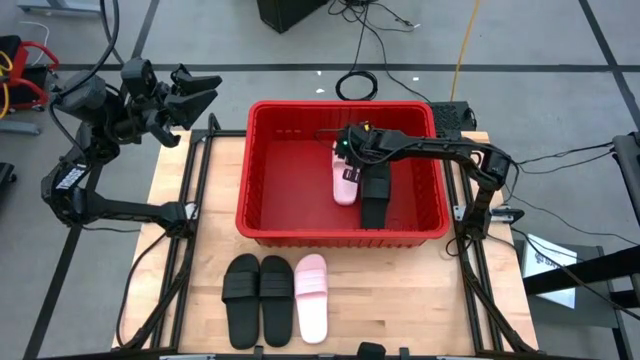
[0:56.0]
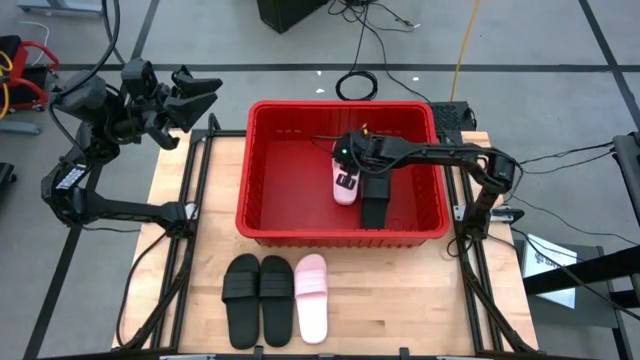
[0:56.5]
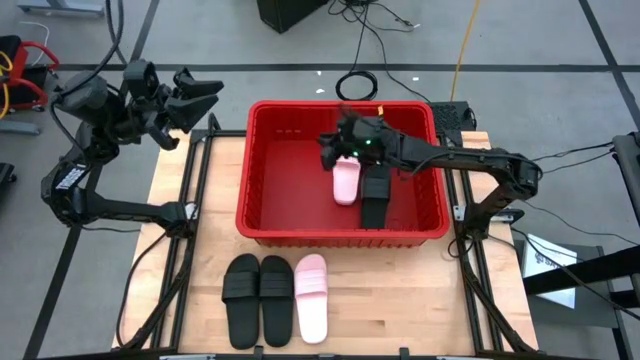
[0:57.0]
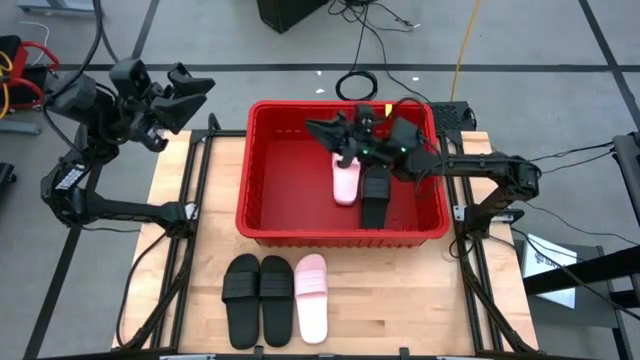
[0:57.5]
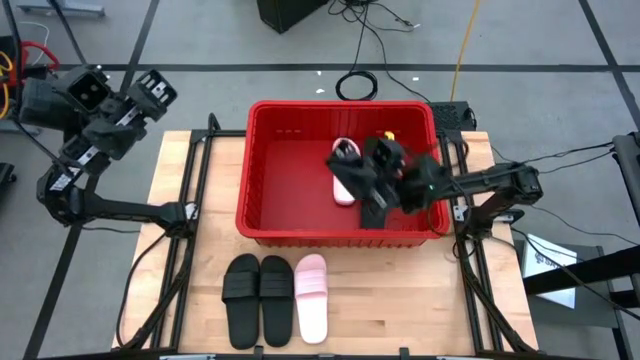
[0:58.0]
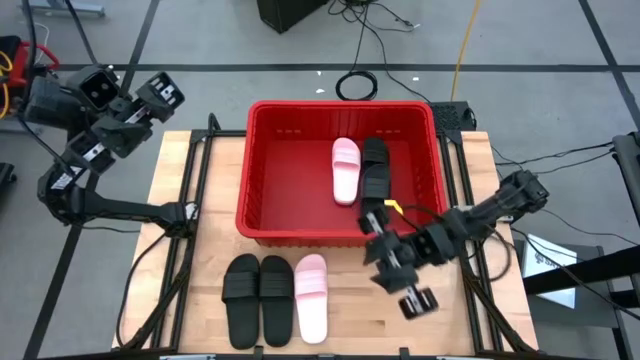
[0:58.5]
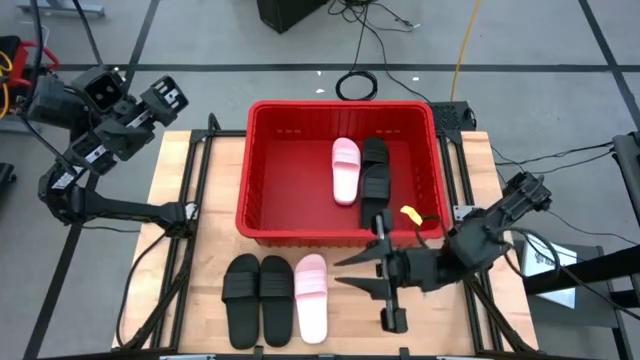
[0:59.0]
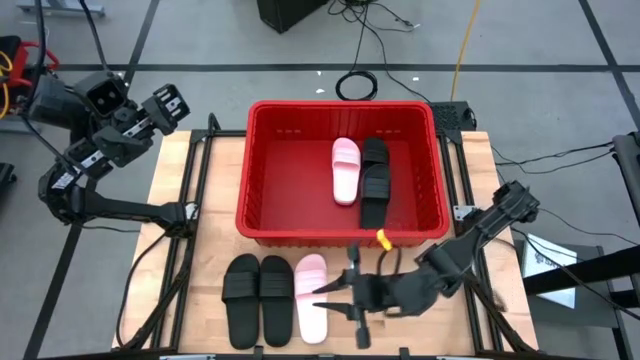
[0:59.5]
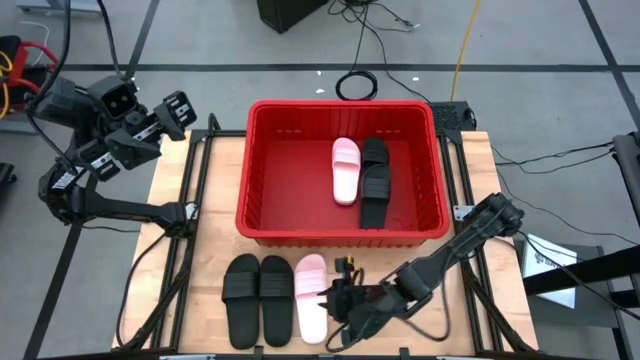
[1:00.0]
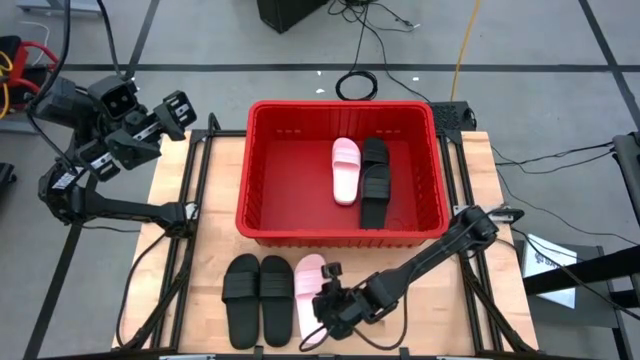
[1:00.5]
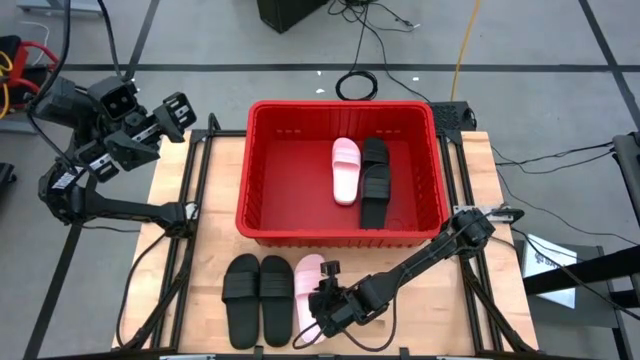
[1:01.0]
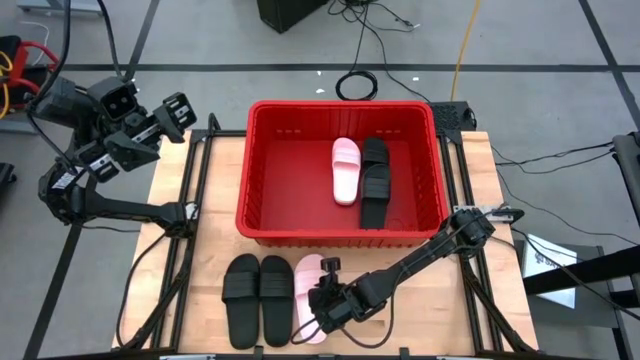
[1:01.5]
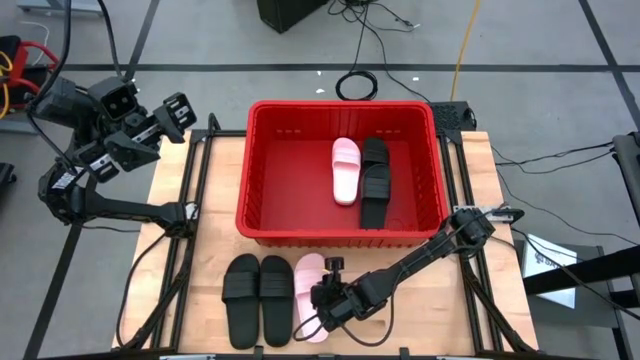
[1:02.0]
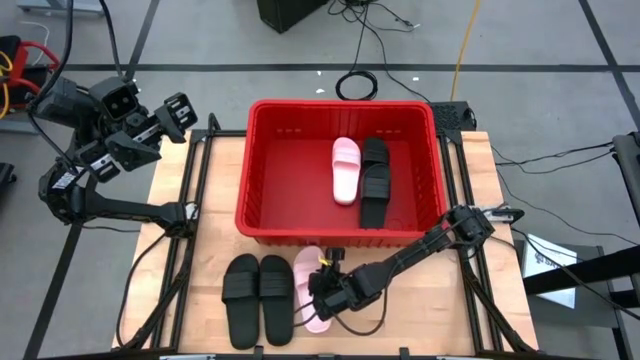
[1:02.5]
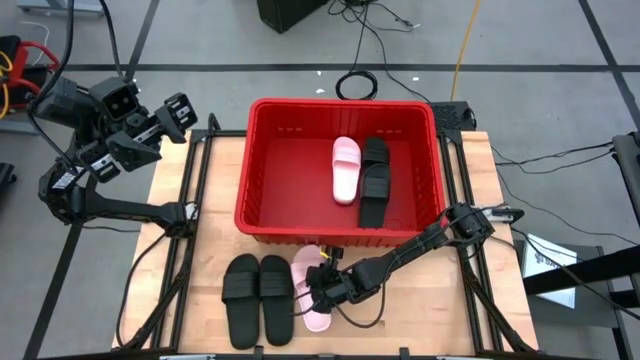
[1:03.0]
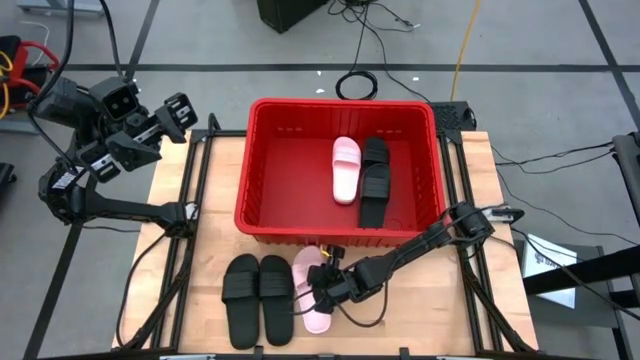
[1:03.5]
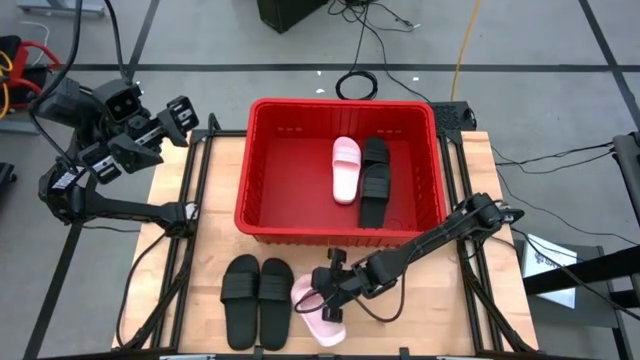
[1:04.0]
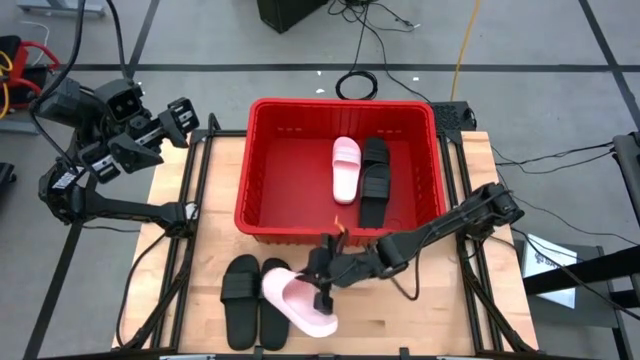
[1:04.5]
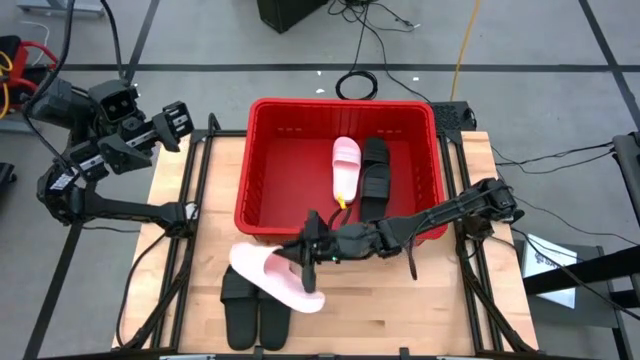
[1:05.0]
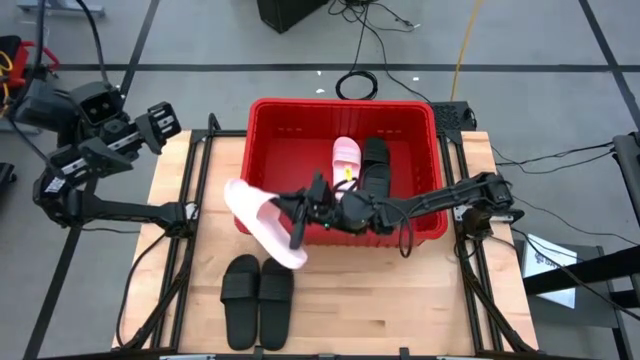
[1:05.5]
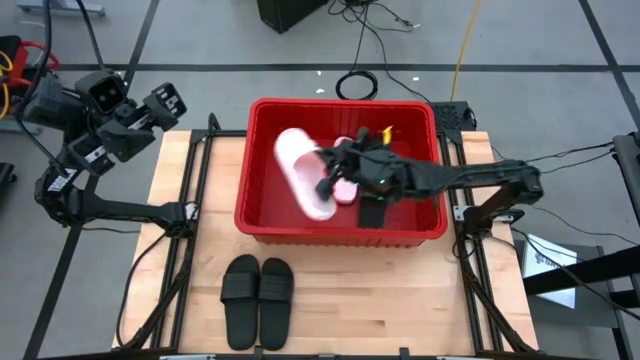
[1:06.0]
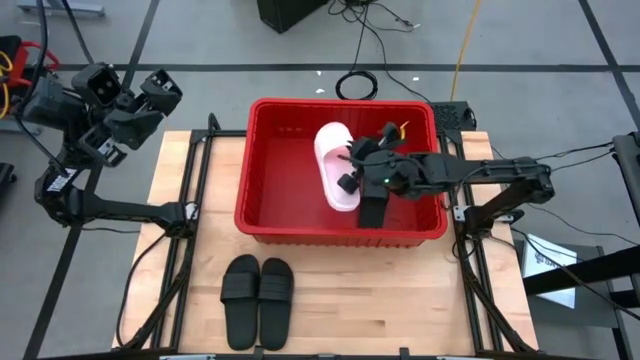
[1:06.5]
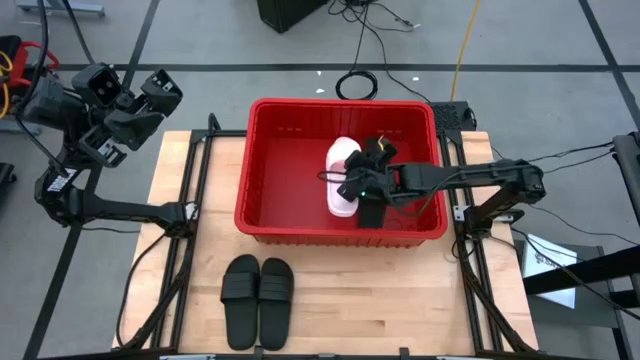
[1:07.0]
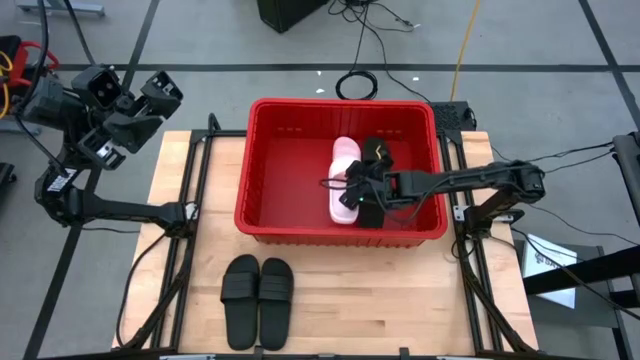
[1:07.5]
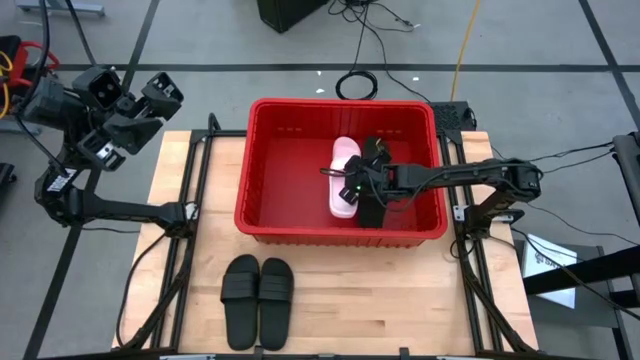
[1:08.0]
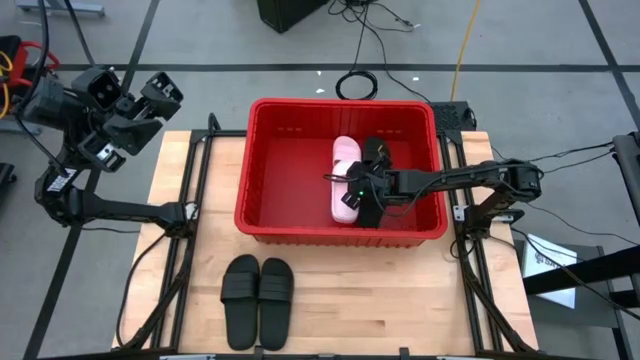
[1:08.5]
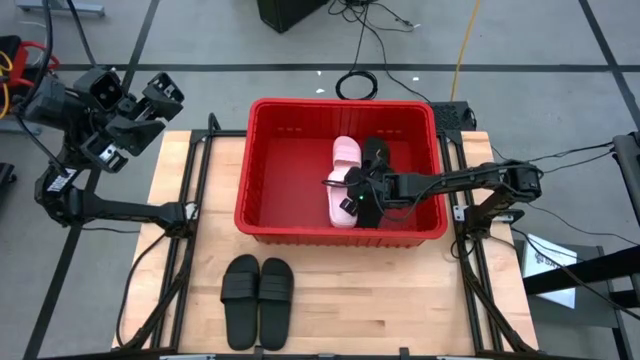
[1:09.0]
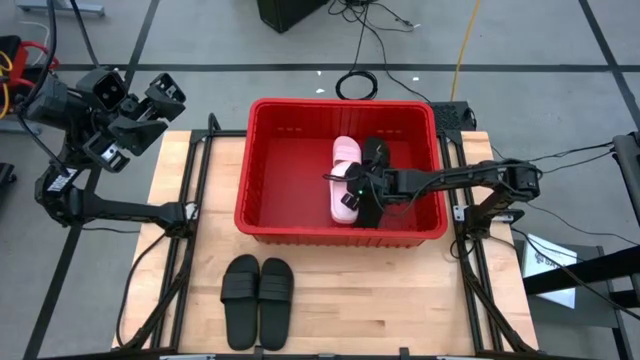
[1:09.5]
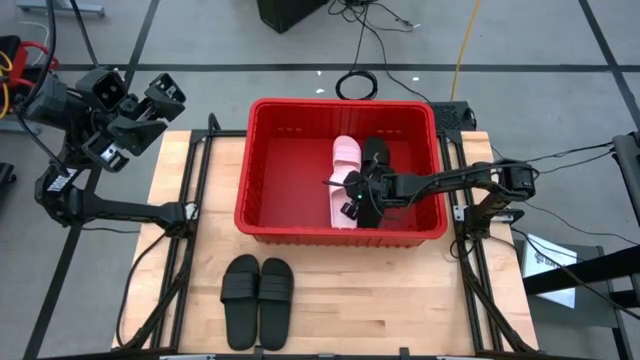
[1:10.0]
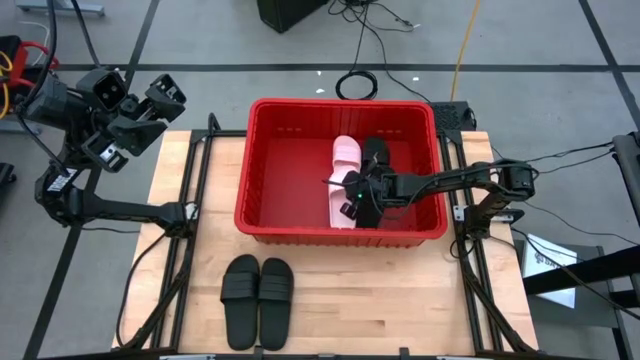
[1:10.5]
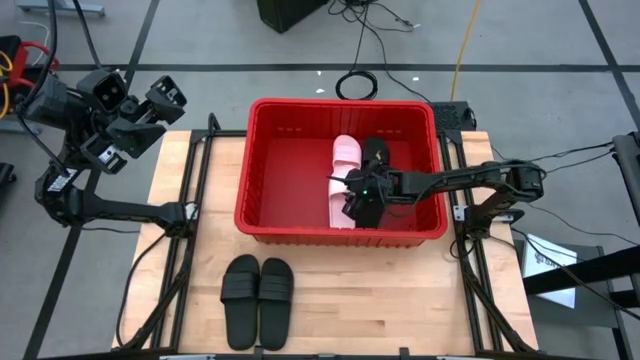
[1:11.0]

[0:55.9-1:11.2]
Task: Pick and place slides into bin
Put the pink slide into the red bin

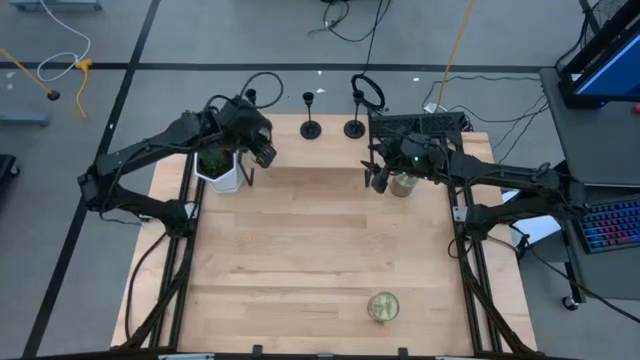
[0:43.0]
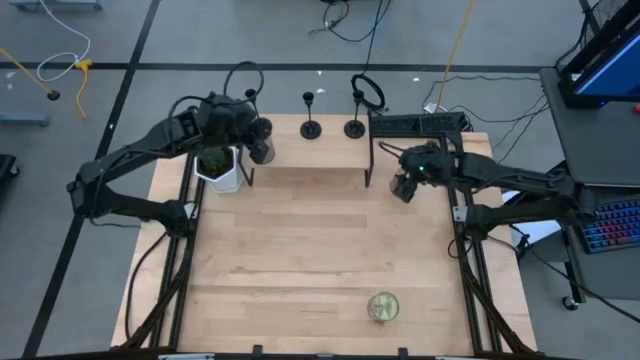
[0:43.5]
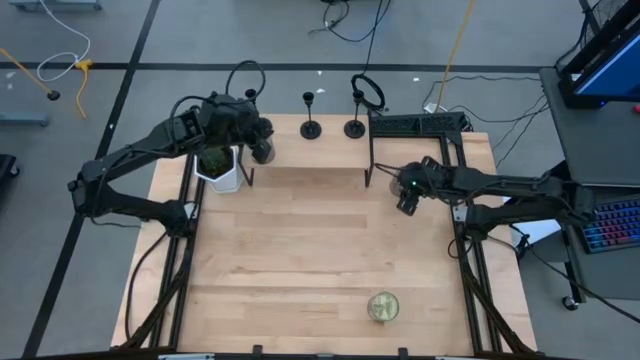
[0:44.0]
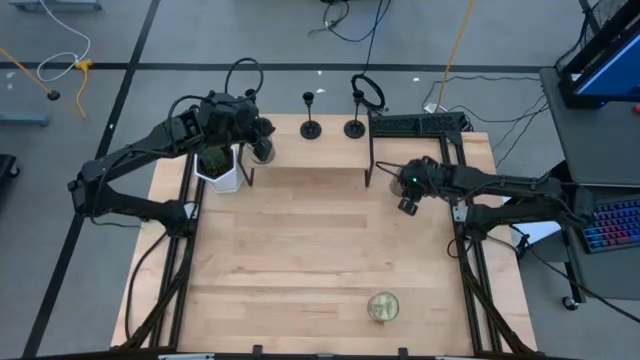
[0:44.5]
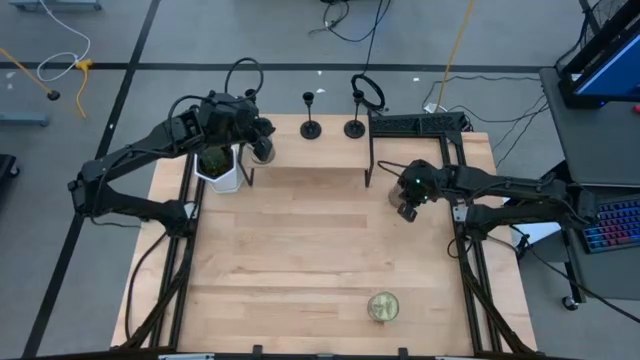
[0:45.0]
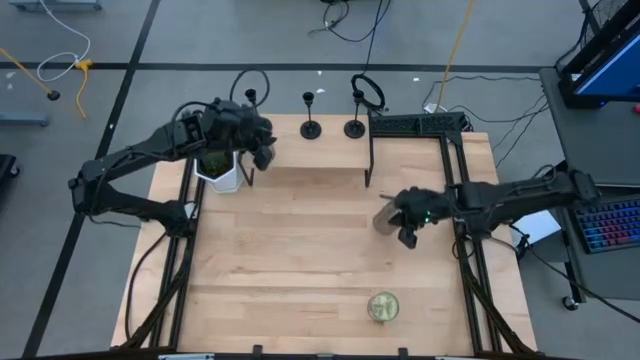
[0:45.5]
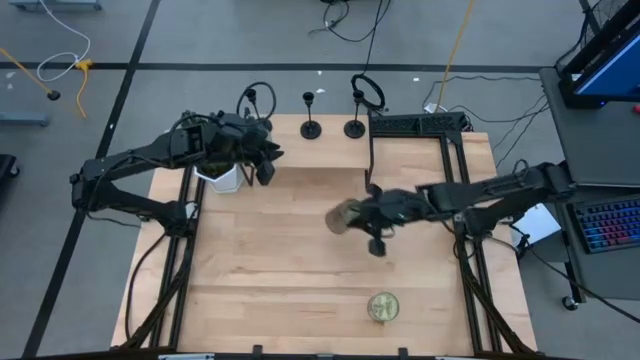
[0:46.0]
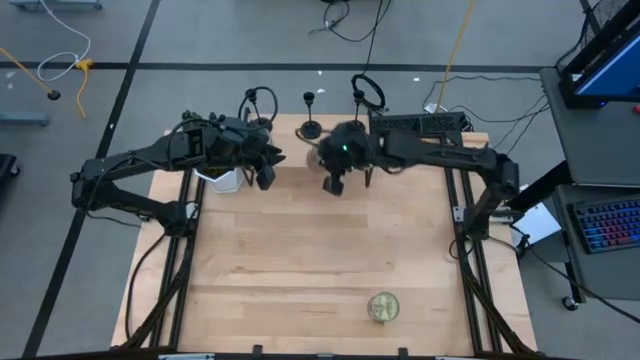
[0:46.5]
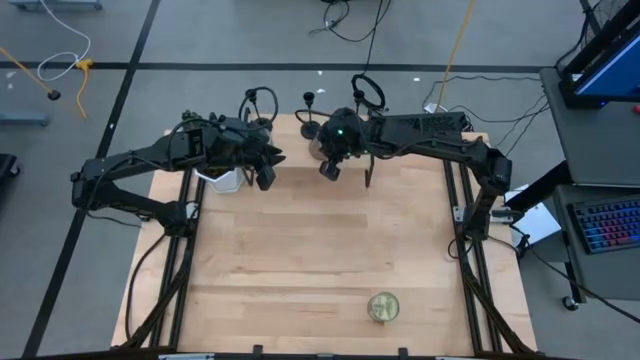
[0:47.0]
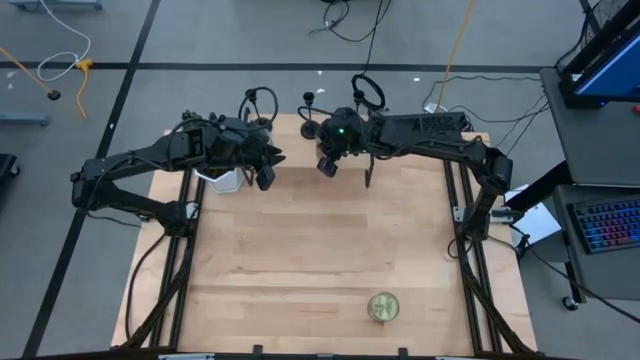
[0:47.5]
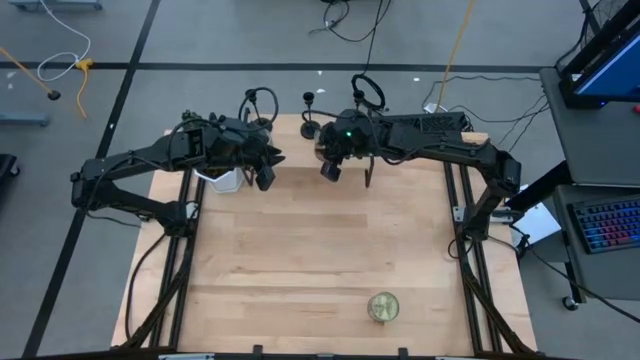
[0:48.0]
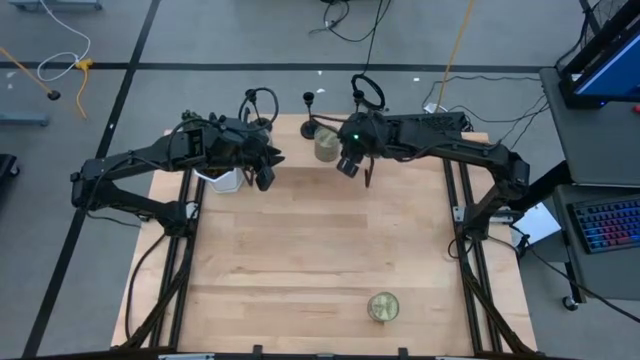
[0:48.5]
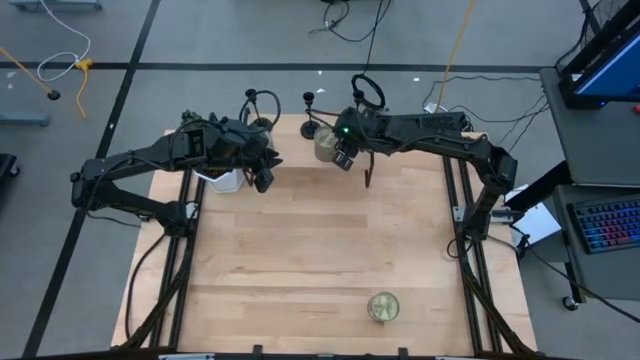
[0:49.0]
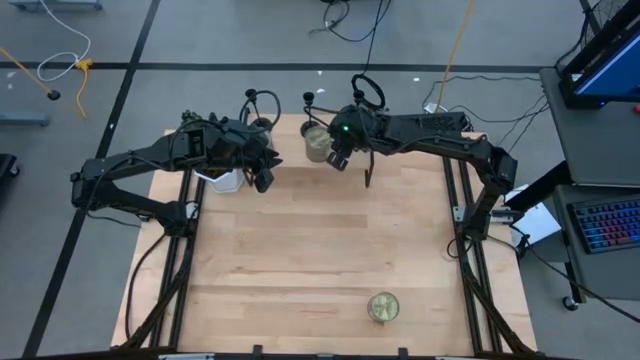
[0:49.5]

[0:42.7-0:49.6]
Task: Pick & Place candle stick holders
Put the top white scented candle on the shelf aligned with the other white scented candles

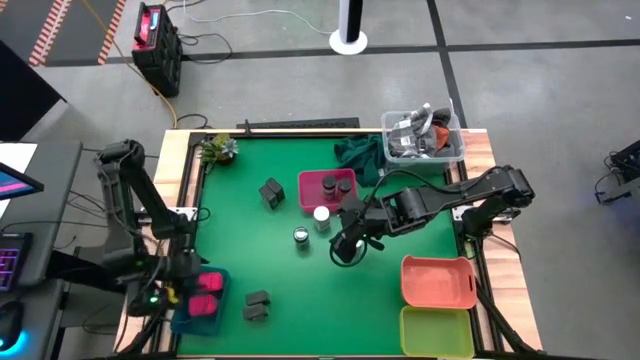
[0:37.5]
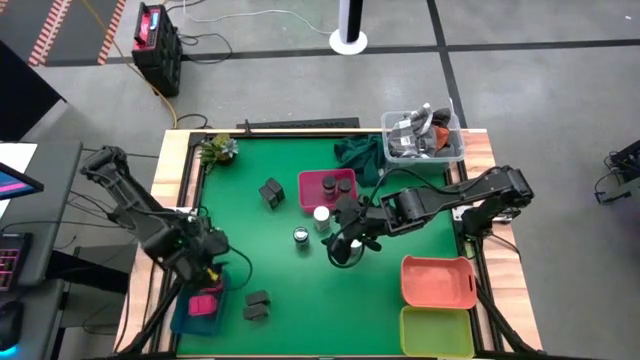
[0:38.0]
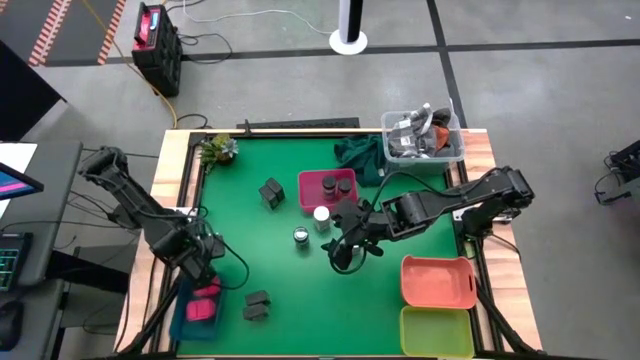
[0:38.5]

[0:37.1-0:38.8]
Task: Sort spices by type
Adjust the blue bin
